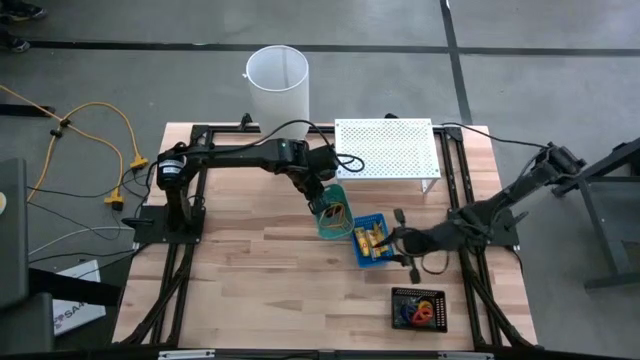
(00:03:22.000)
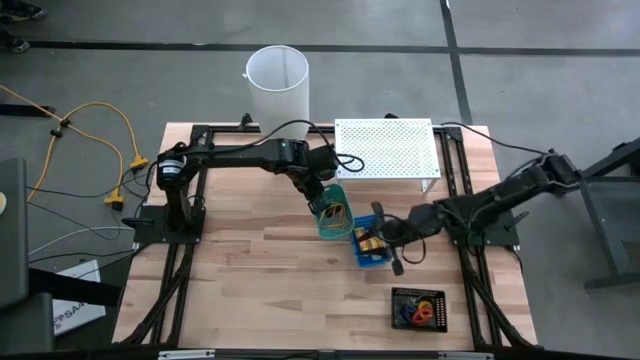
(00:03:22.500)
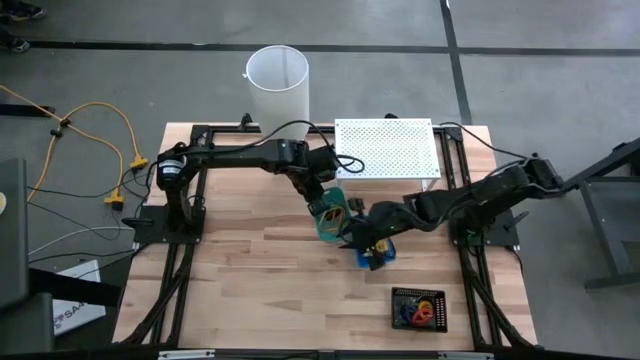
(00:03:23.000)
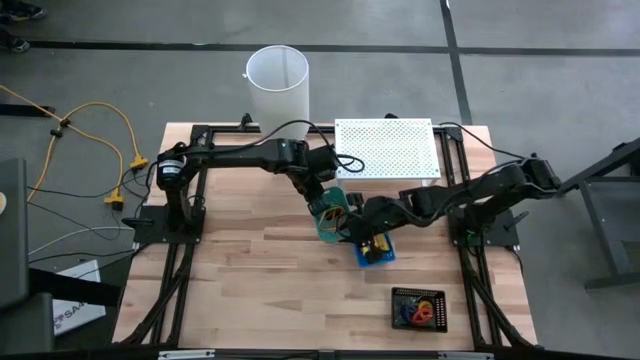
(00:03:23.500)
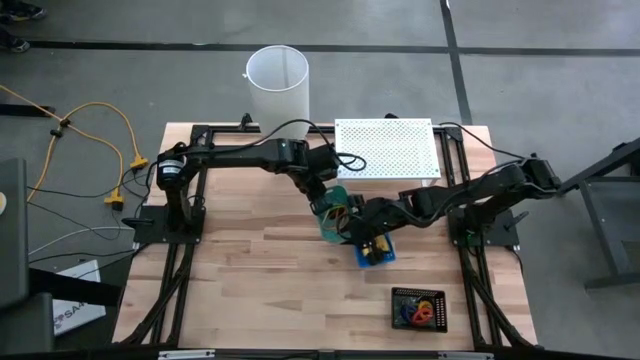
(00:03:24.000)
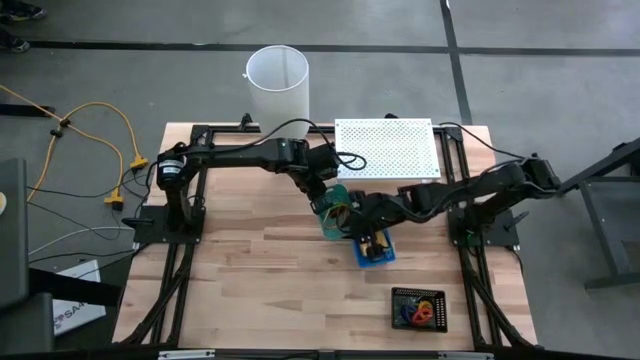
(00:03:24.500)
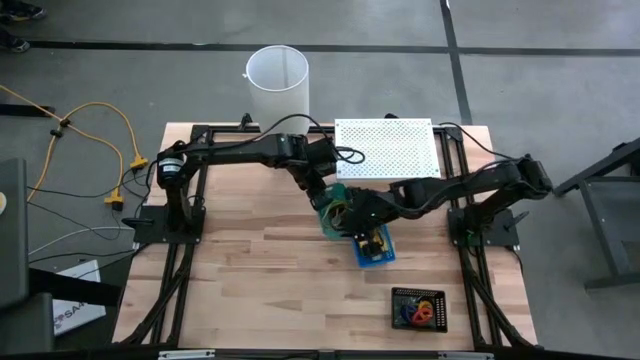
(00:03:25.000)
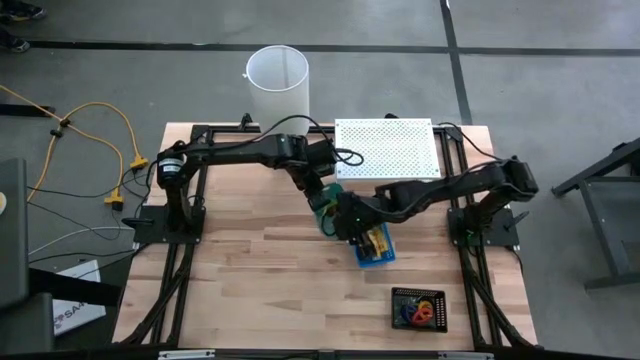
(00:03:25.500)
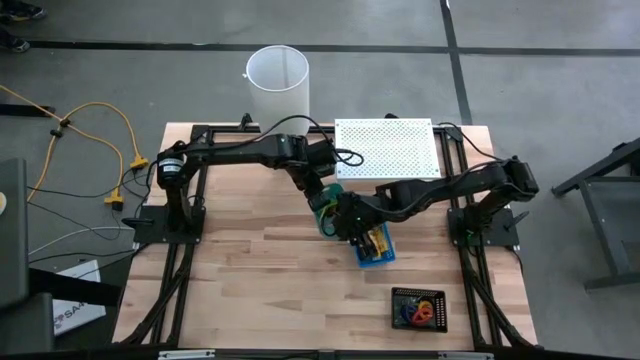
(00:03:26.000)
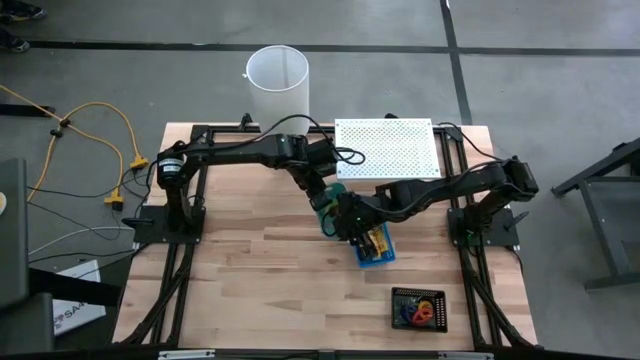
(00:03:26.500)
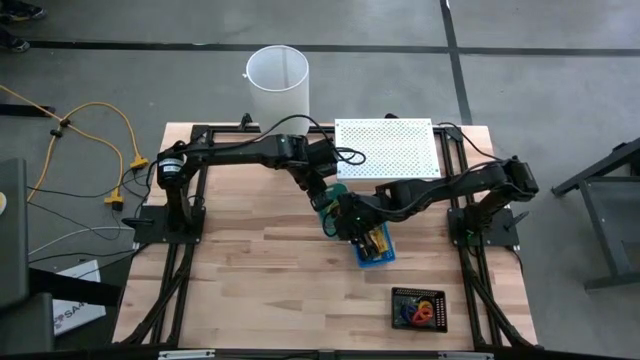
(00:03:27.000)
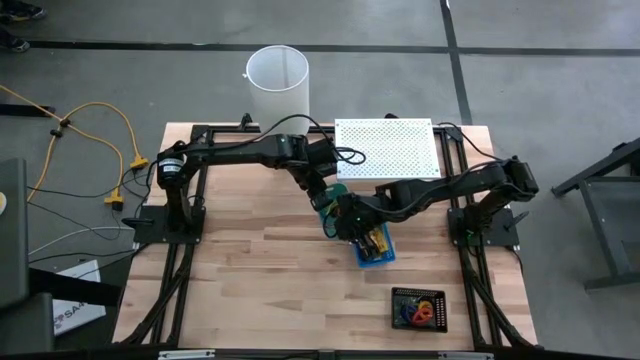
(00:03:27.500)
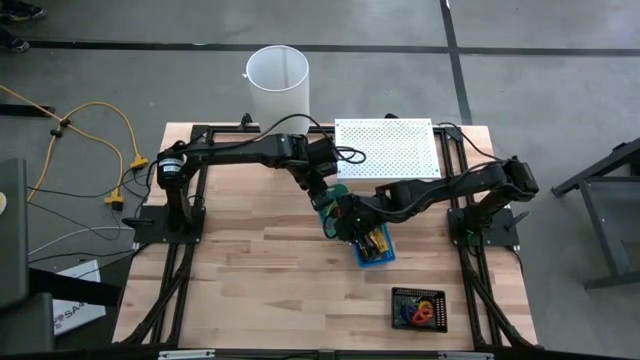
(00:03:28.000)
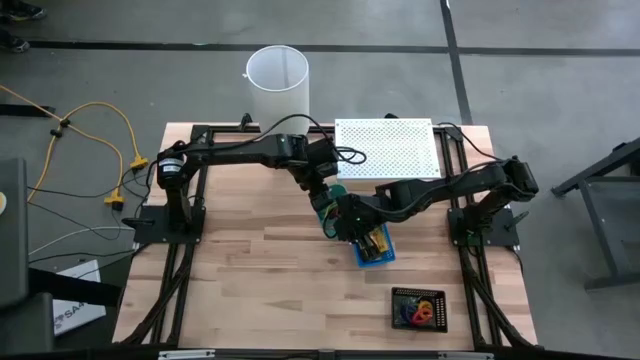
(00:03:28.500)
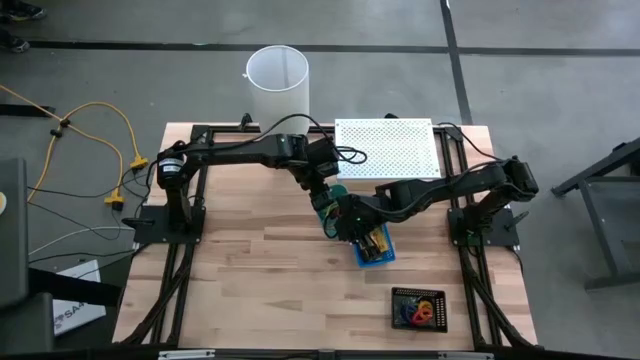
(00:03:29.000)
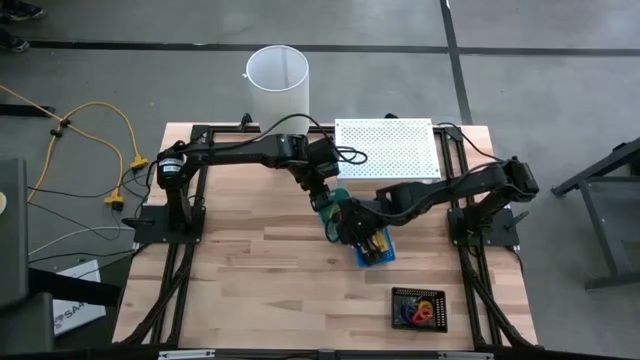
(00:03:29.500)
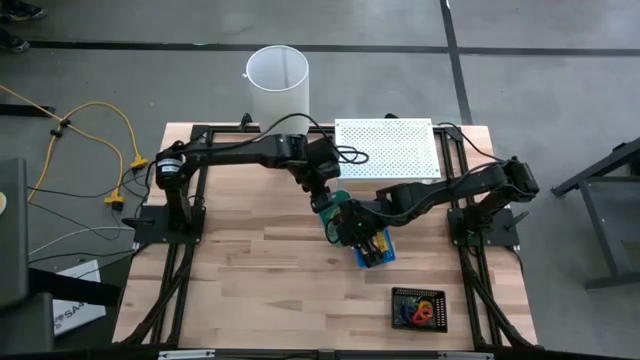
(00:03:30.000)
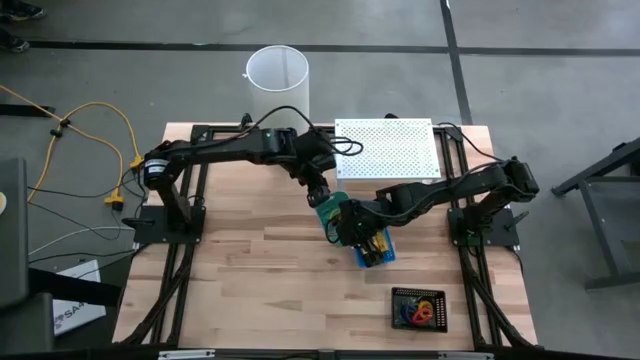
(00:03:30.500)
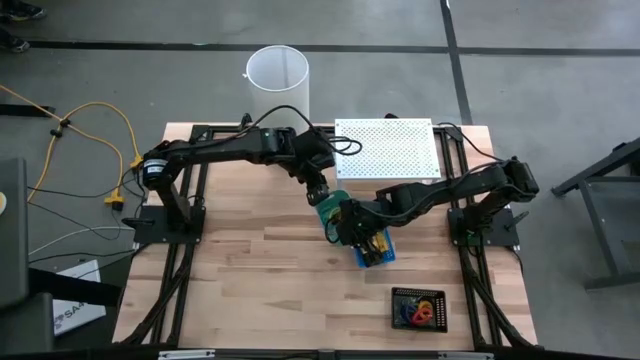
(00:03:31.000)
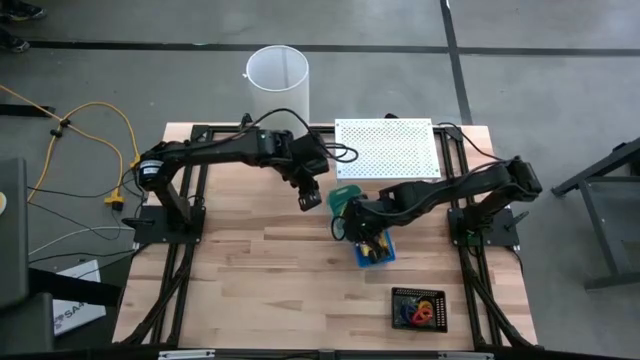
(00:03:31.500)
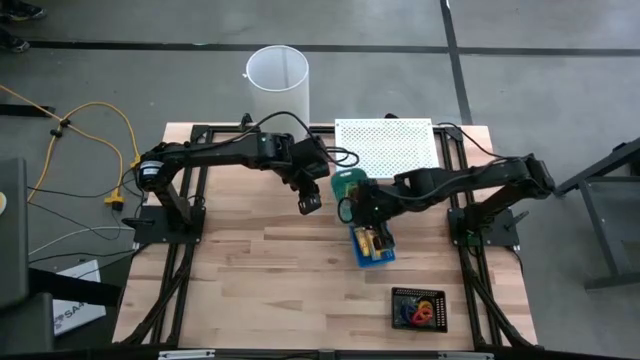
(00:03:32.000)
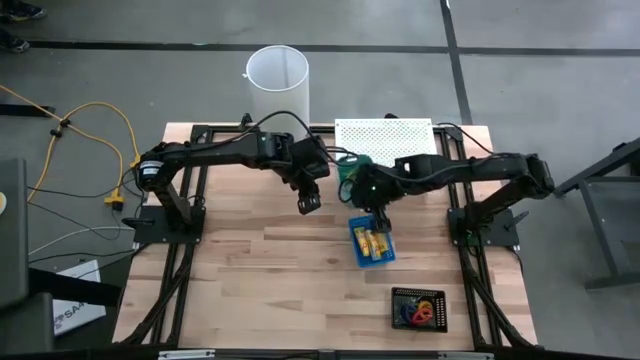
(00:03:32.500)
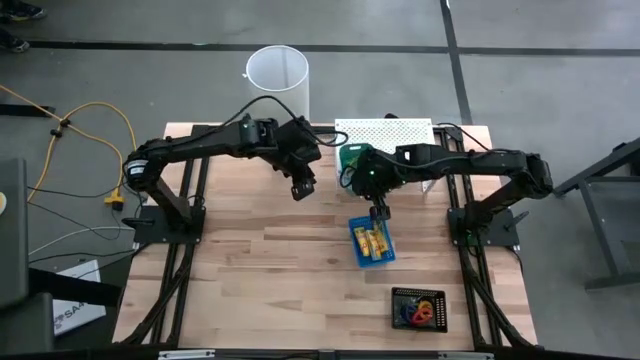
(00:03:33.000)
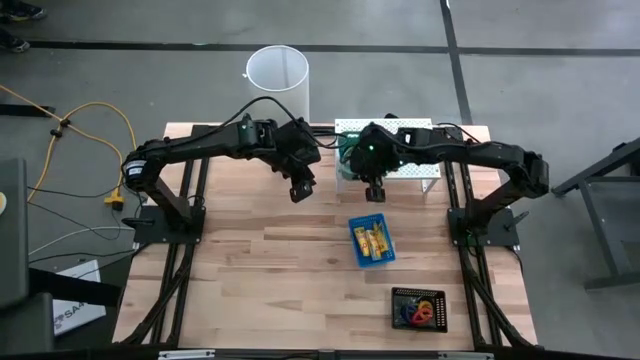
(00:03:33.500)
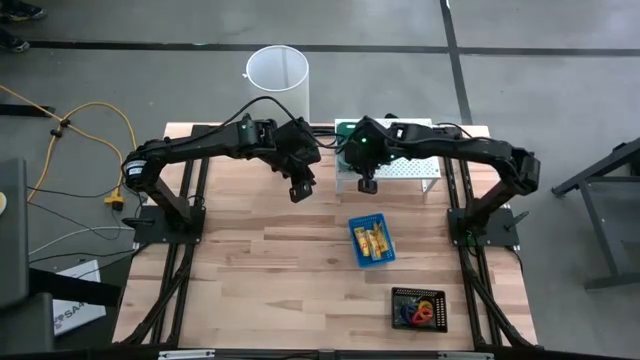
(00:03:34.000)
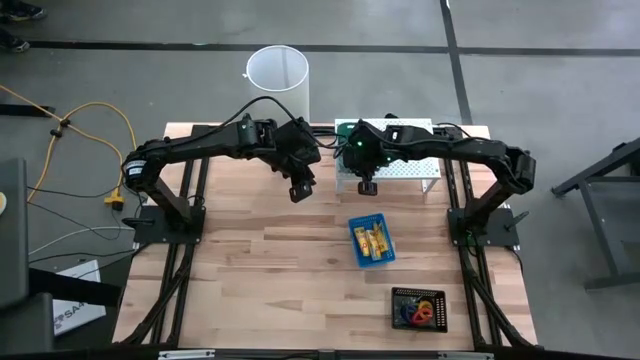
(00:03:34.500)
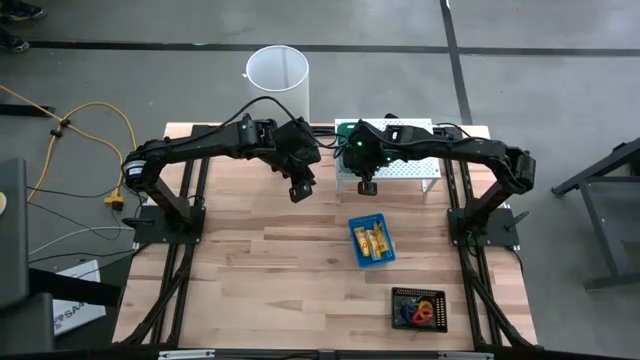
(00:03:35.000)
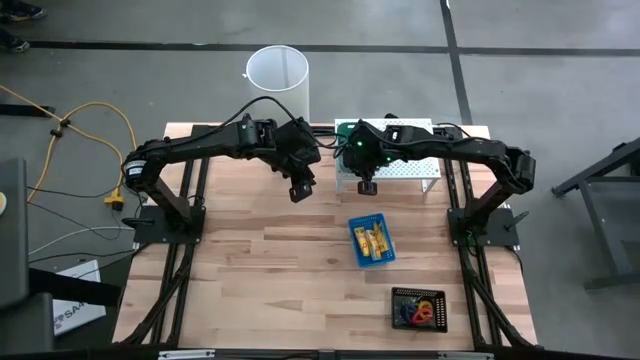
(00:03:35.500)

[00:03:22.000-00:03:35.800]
Task: Pick & Place Office Desk Supplies
Put the green bin on the shelf

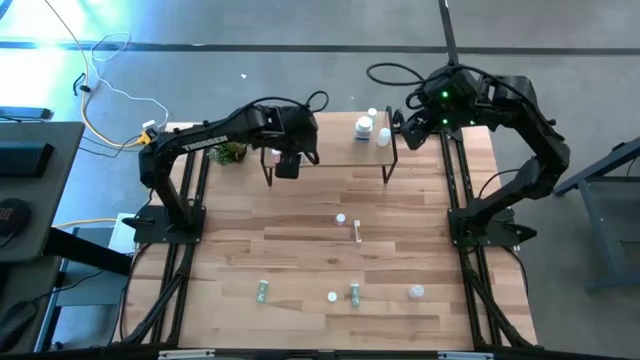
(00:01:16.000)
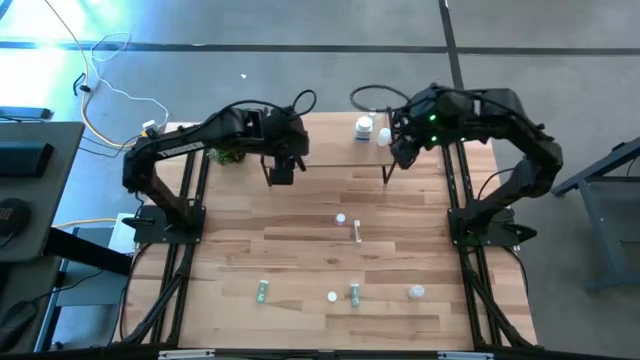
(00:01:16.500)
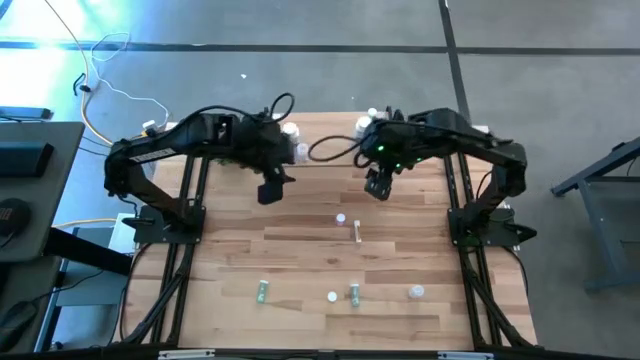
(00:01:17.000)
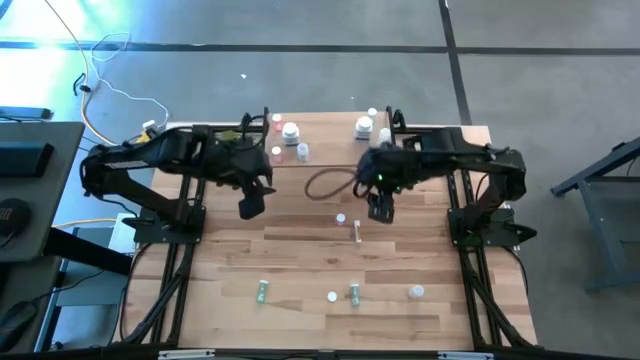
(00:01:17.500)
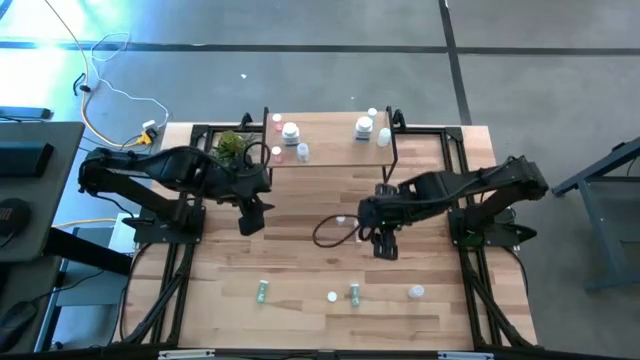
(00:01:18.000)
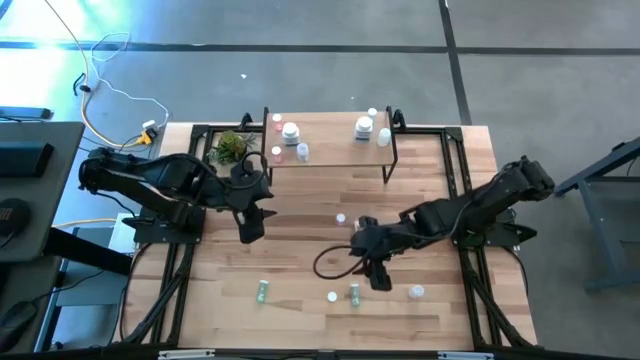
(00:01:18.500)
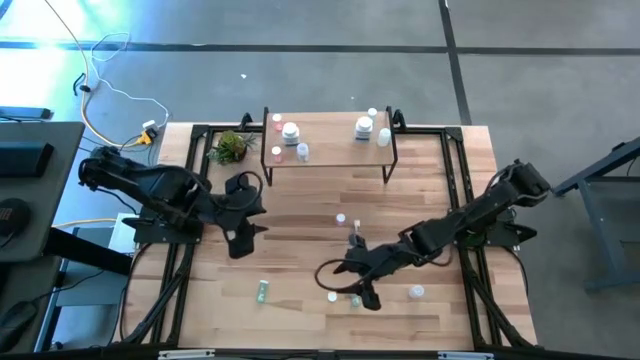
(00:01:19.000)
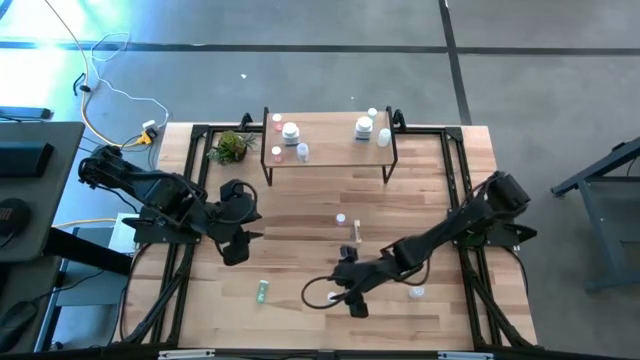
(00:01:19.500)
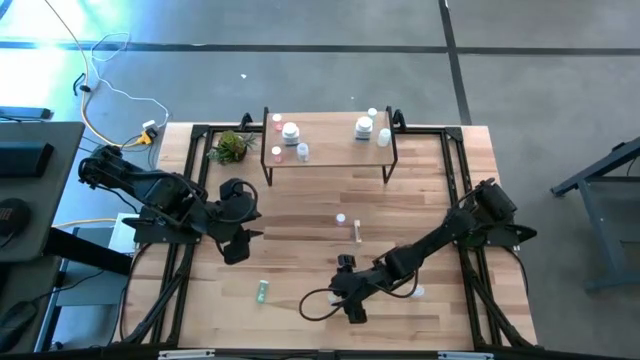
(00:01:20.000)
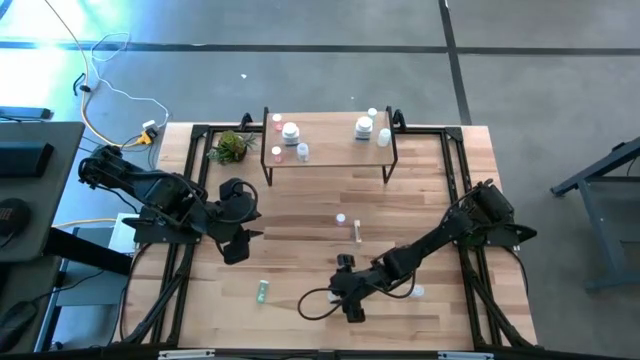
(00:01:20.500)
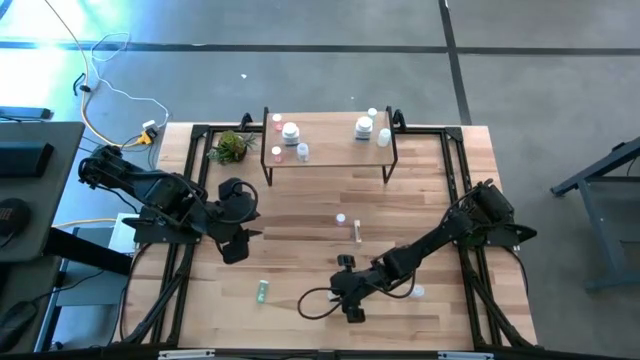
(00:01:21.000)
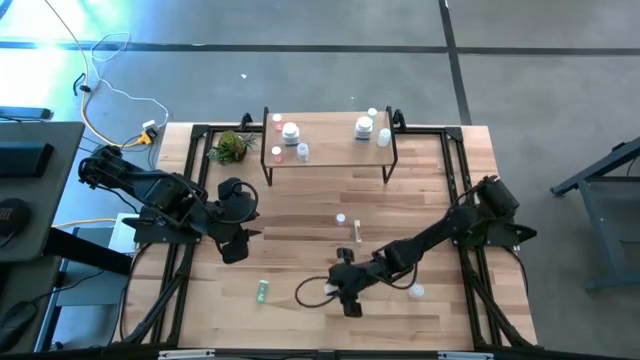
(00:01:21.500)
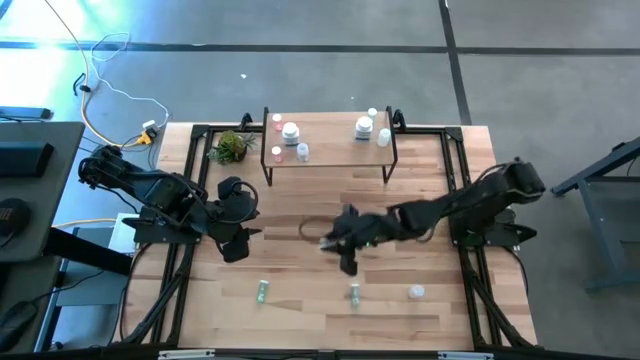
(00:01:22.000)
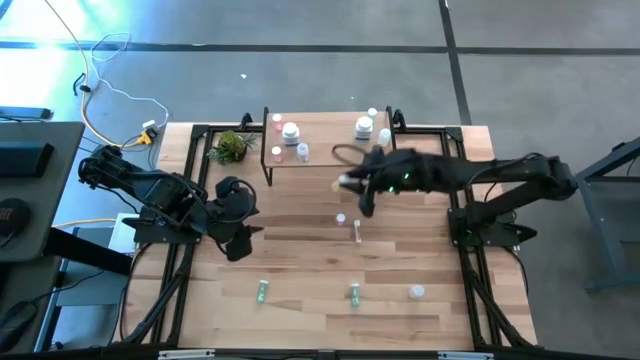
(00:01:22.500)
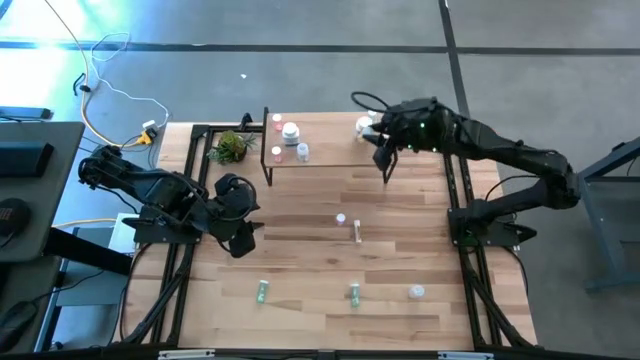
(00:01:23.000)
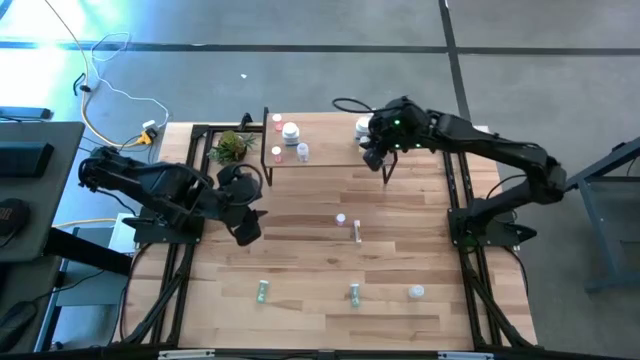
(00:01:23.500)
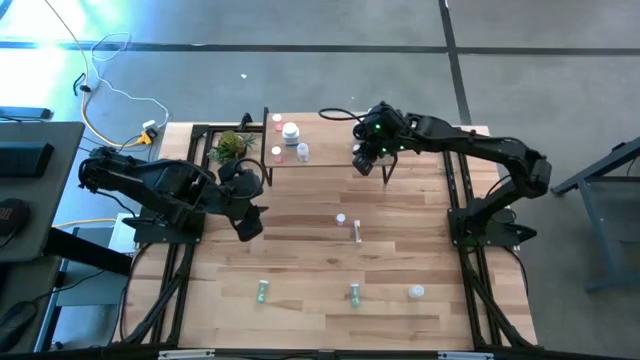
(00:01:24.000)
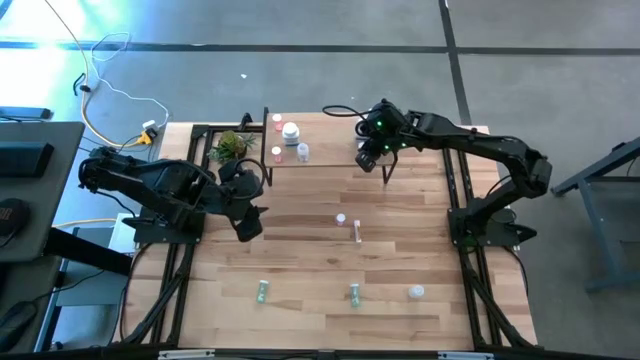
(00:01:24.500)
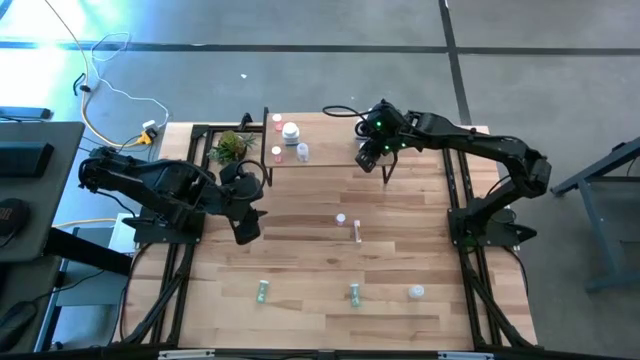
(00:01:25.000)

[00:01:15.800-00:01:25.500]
Task: Pick and place medicine bottles onto shelf by color
Put the yellow pill bottle on the shelf
